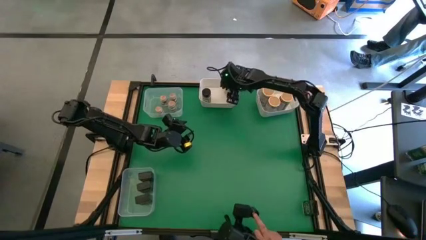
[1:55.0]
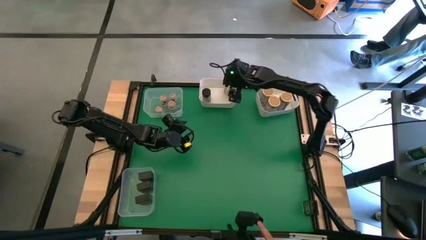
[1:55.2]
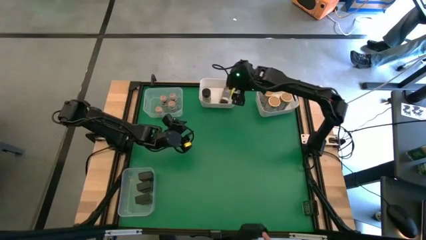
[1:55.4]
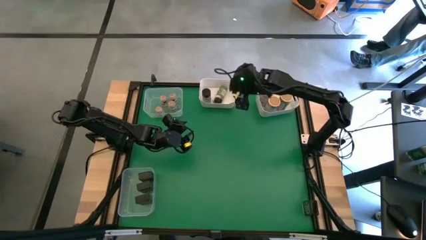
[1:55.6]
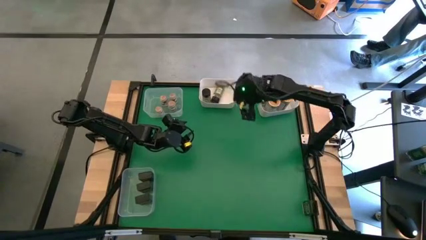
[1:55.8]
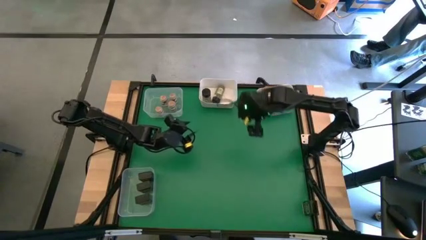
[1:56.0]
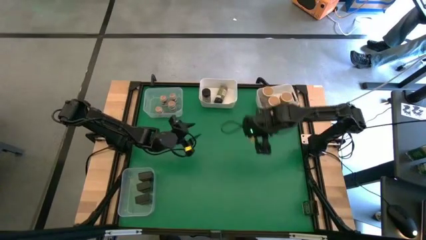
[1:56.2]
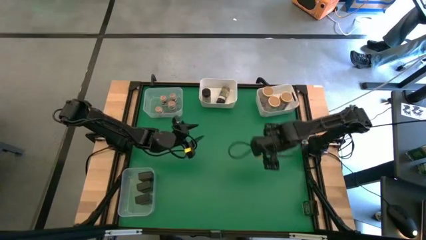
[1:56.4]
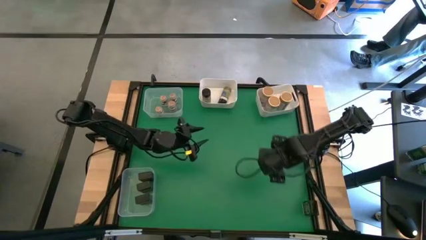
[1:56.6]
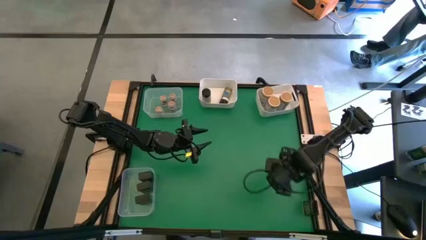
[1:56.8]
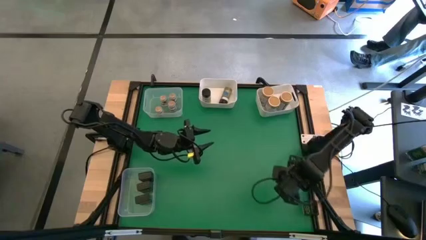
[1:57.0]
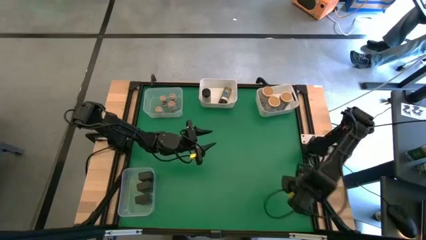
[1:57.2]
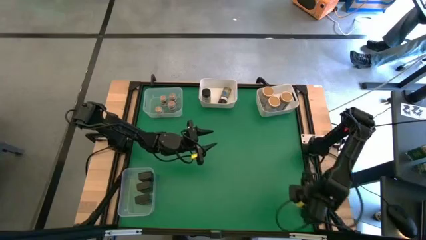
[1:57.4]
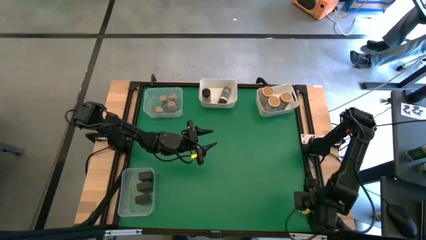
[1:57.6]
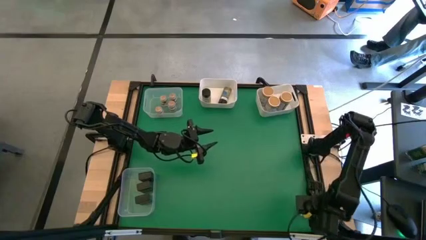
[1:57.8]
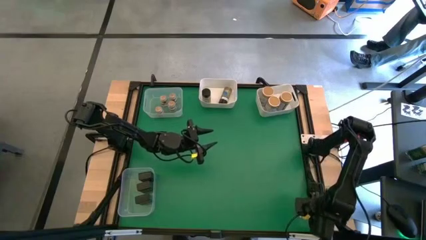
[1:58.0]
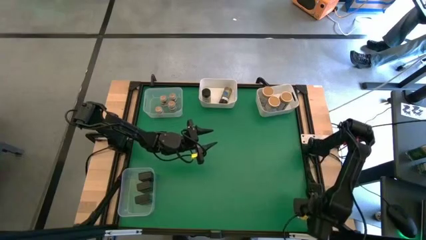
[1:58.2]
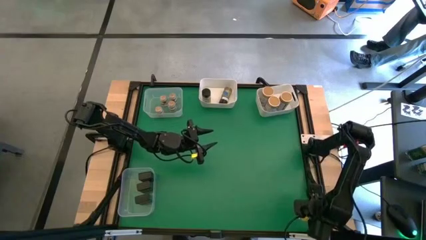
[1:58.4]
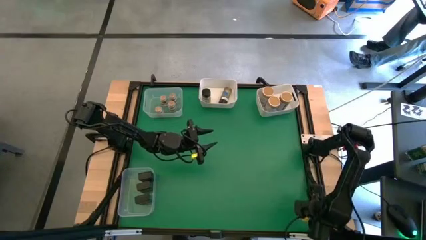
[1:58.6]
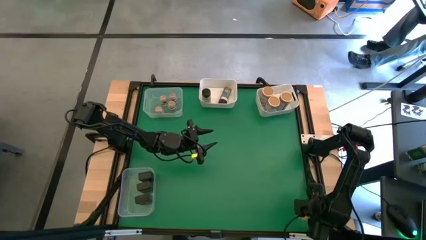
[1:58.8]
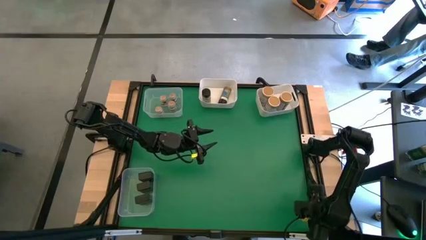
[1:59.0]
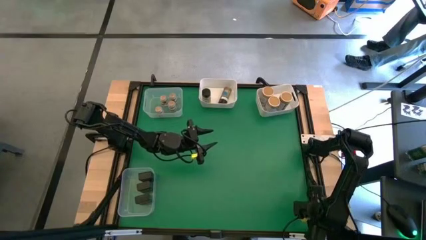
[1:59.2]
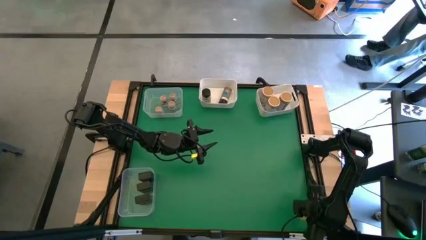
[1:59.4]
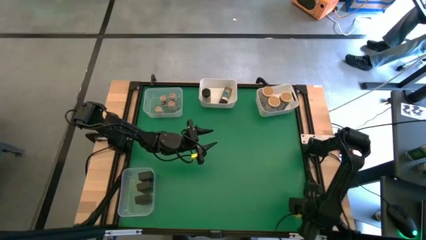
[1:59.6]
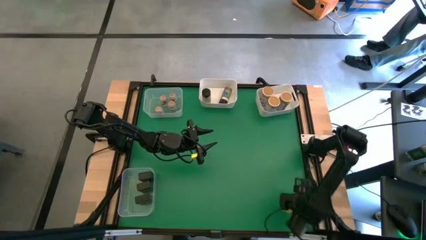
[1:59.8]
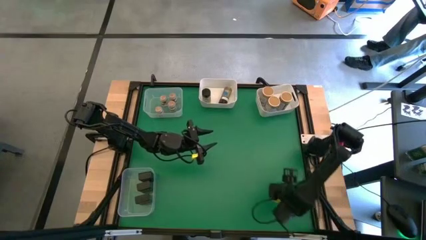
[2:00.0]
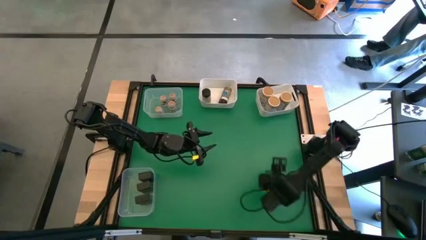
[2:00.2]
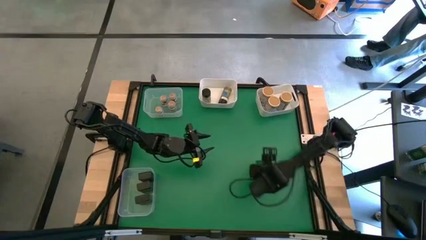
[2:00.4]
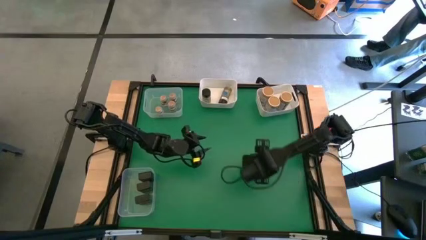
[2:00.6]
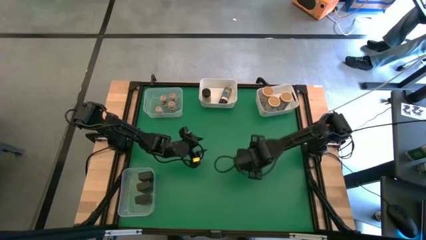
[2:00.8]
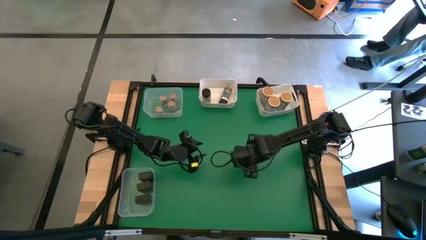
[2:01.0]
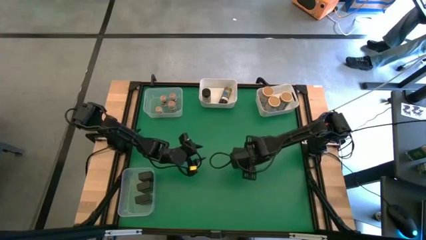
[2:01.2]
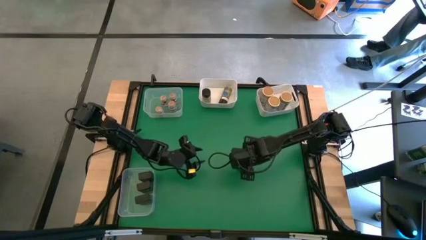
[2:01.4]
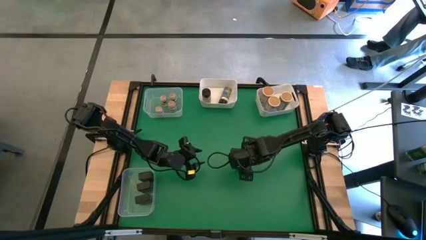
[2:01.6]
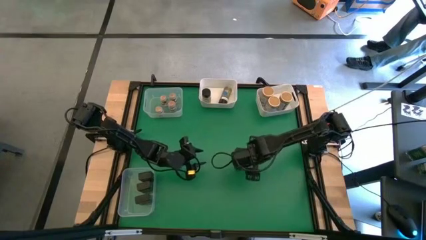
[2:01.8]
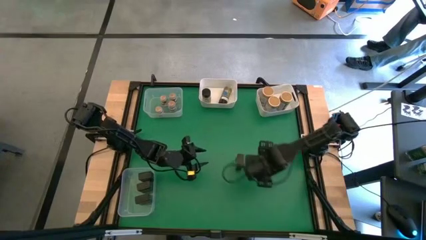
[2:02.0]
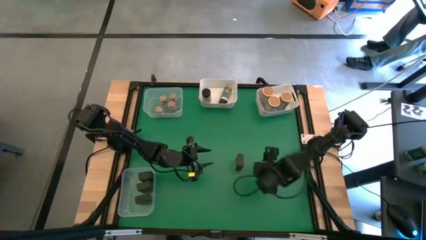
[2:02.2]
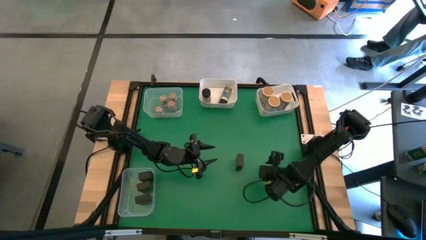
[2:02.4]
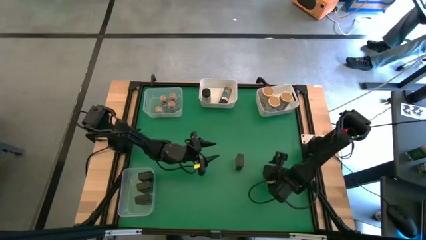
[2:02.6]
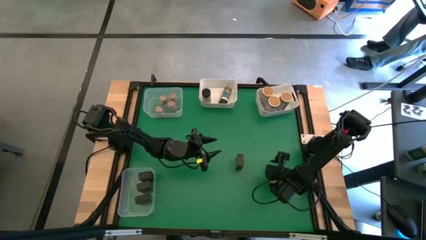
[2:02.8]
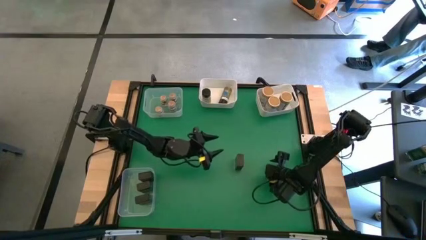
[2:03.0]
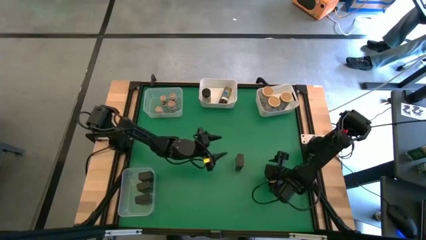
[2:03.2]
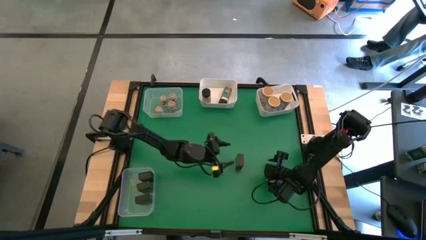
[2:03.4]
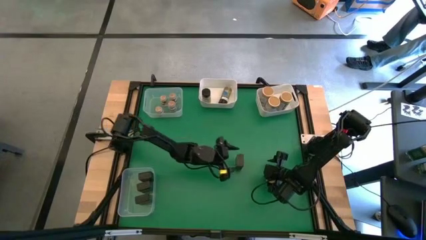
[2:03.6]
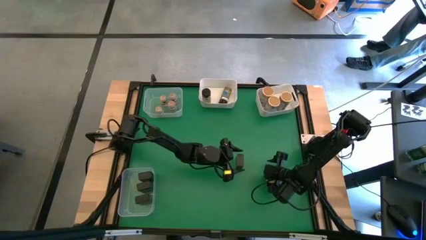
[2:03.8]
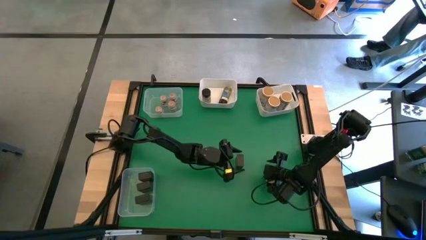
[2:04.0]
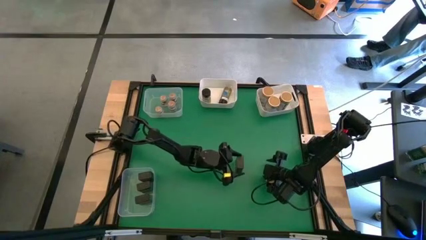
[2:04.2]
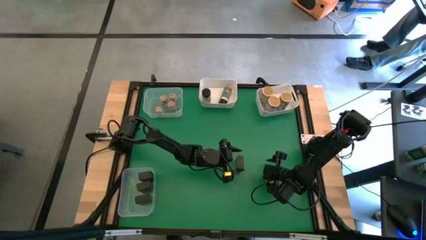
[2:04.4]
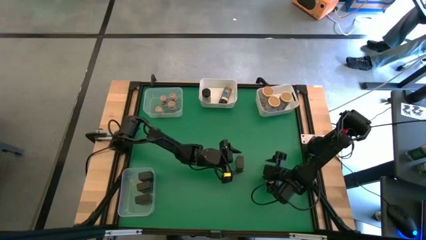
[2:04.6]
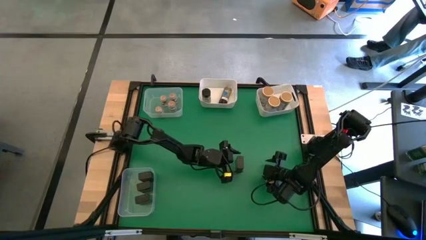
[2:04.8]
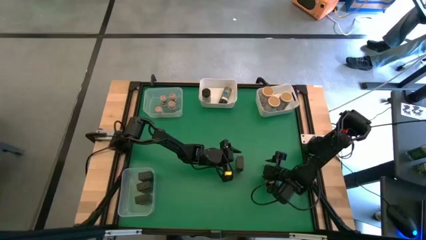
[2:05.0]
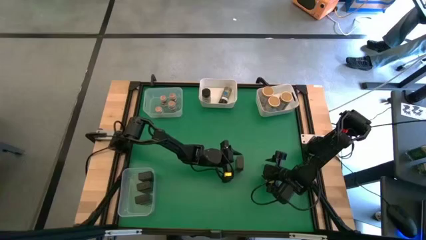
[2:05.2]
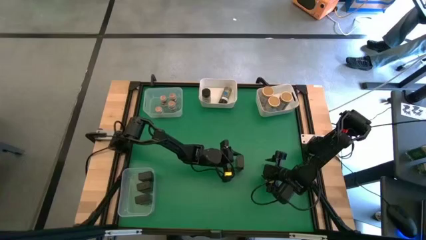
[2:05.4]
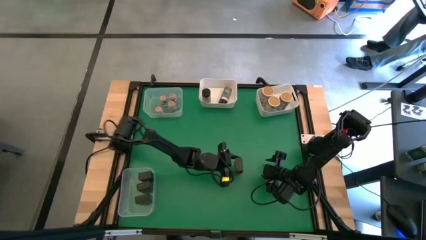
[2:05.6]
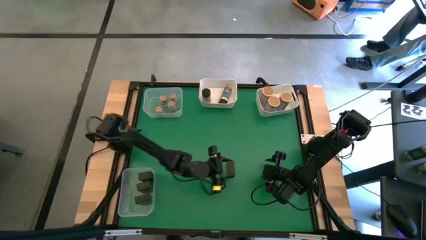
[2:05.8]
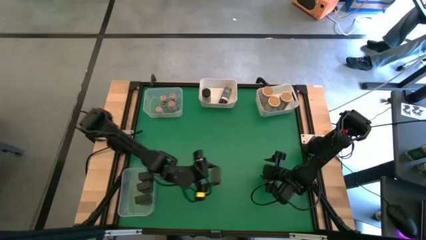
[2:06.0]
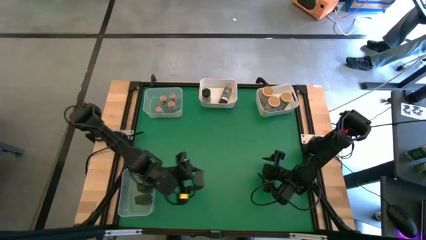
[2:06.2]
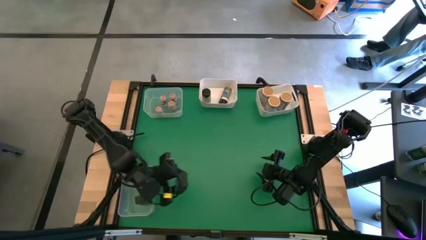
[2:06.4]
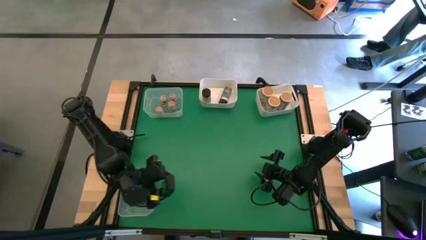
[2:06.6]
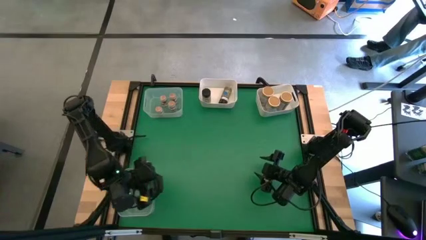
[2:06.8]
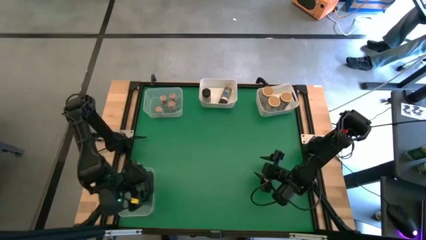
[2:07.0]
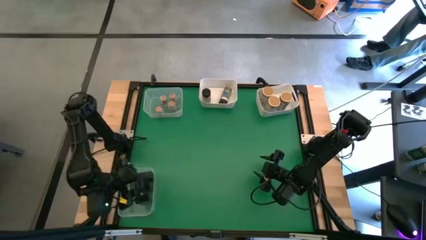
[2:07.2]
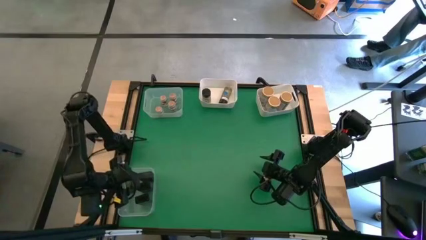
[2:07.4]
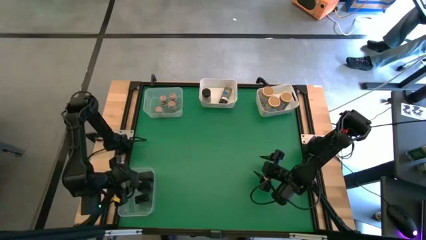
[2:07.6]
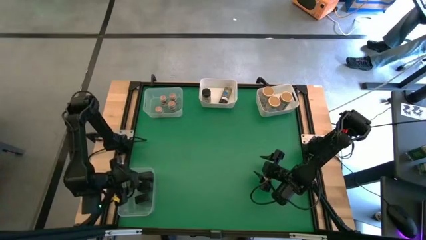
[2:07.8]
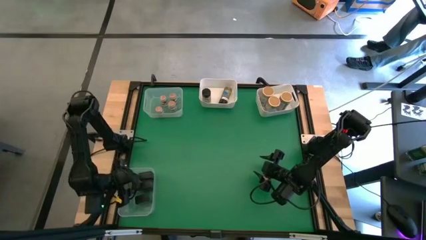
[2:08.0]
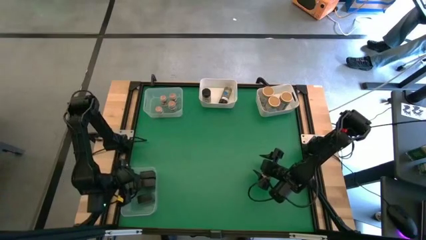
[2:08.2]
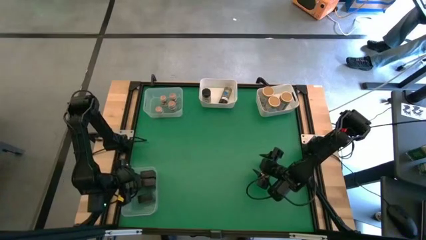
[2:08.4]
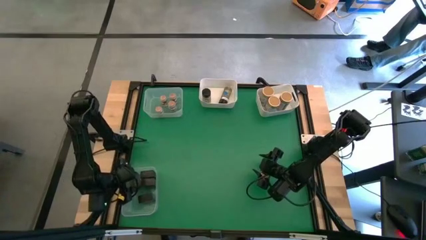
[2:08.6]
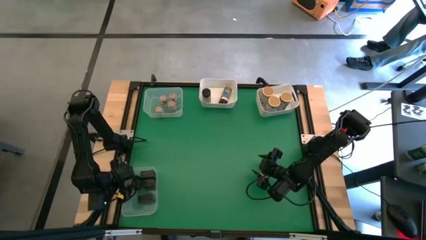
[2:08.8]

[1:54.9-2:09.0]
Task: Sort spices by type
Put the black seasoning can into the bottom transparent bin

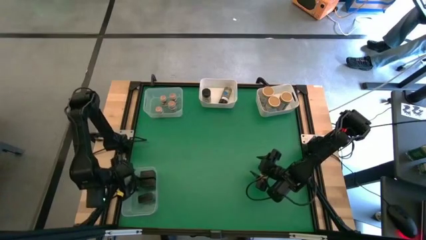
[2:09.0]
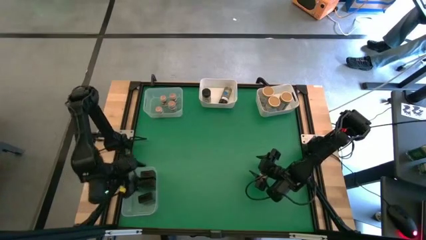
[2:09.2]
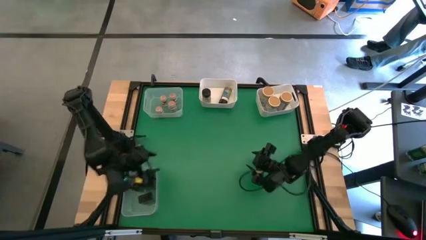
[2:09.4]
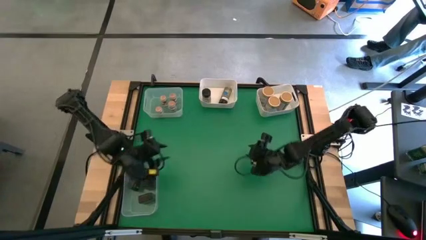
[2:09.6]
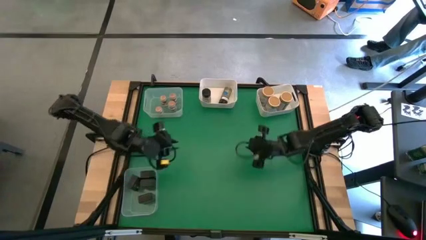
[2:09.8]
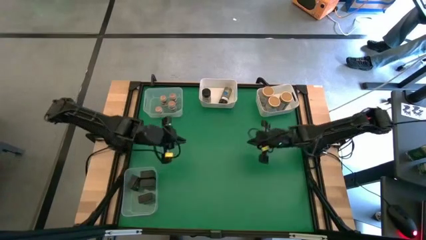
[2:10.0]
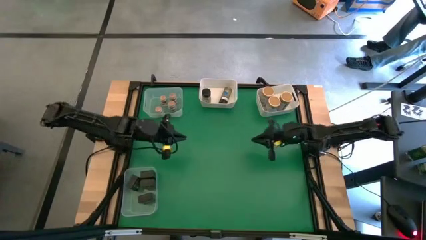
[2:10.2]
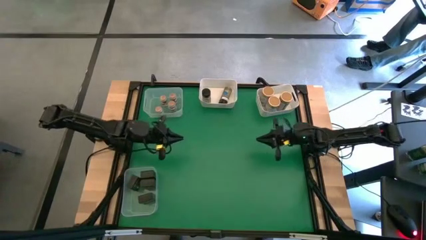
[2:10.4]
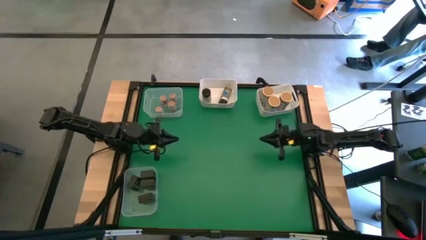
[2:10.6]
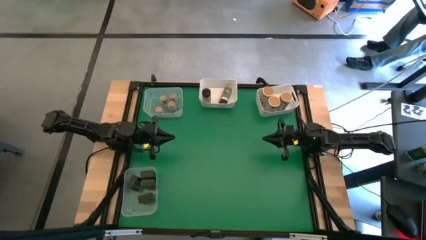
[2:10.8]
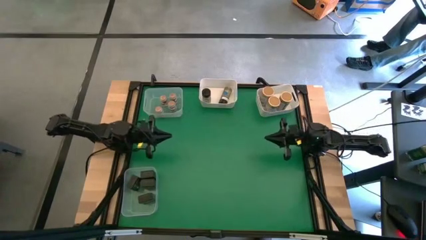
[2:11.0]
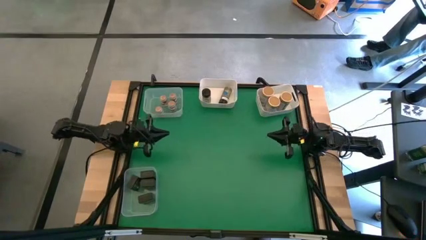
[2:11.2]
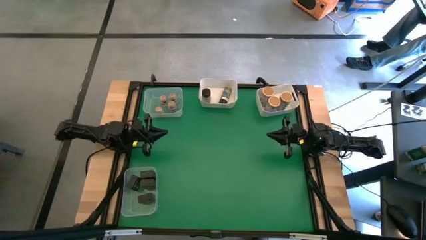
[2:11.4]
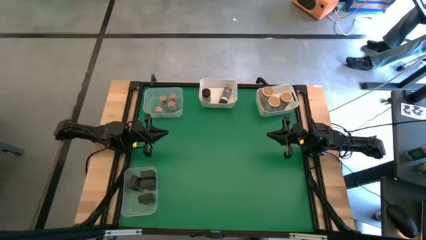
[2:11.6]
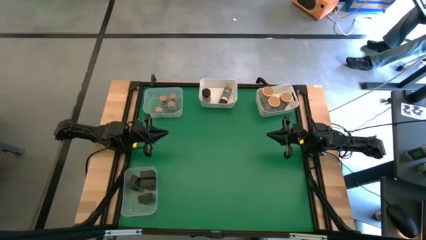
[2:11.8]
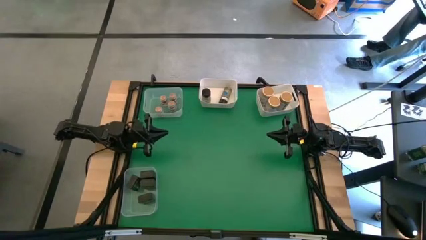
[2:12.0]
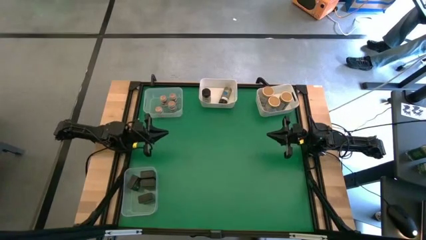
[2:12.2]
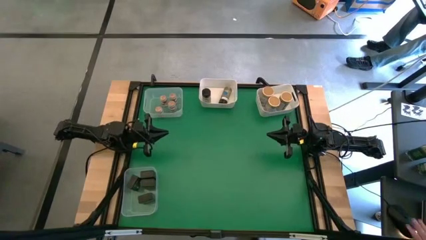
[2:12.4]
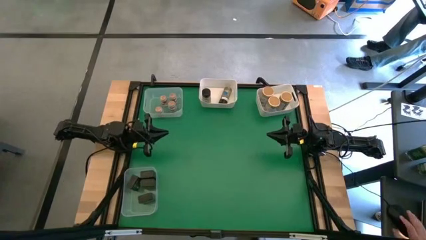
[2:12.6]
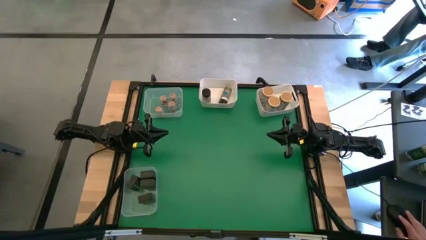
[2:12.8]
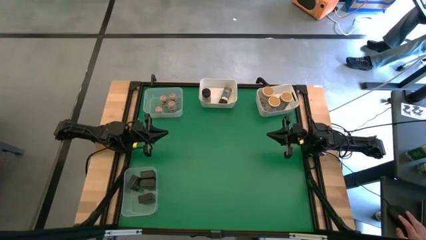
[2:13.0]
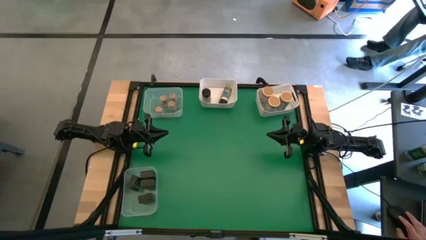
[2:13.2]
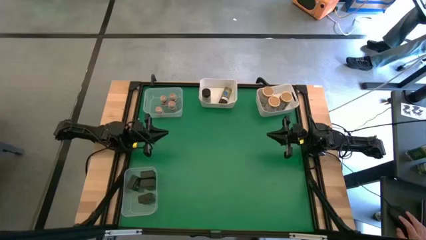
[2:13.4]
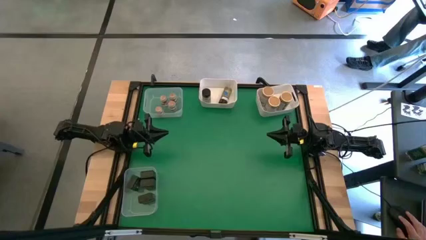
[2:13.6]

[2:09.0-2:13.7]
Return to Home Position
